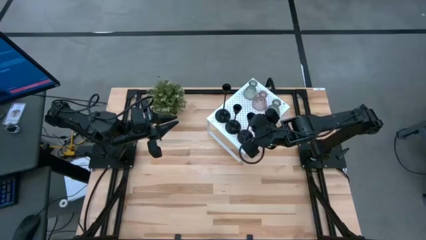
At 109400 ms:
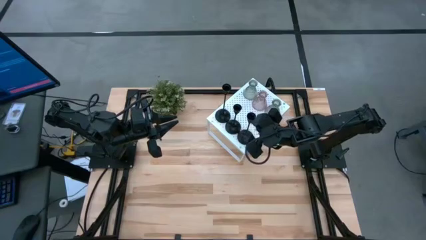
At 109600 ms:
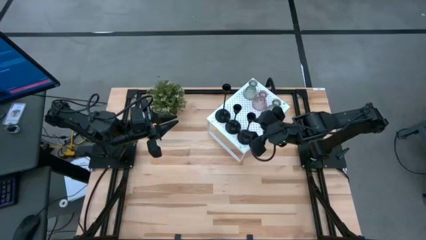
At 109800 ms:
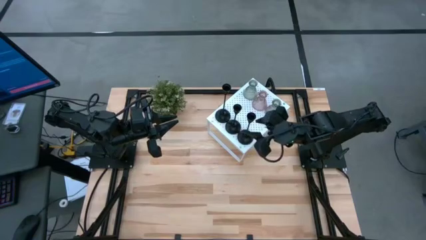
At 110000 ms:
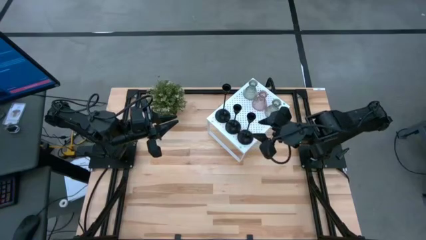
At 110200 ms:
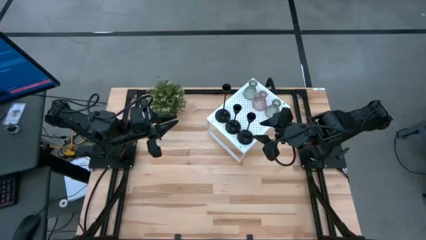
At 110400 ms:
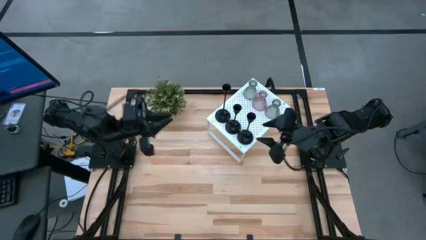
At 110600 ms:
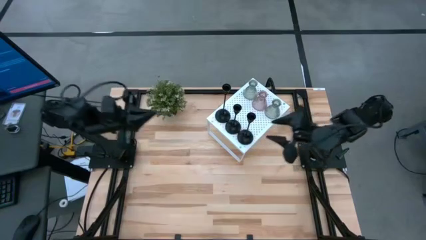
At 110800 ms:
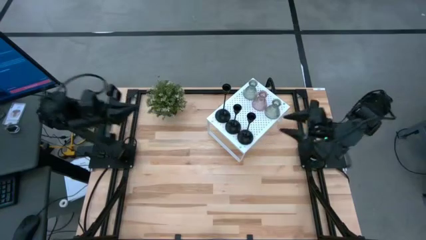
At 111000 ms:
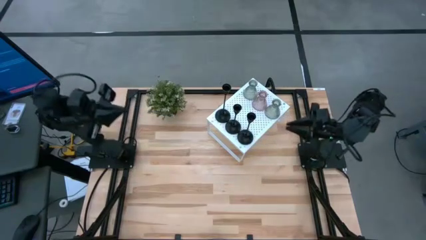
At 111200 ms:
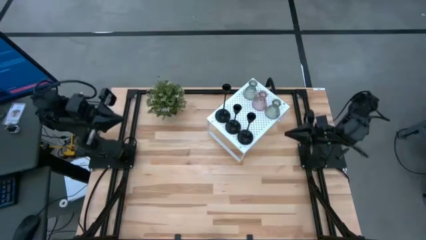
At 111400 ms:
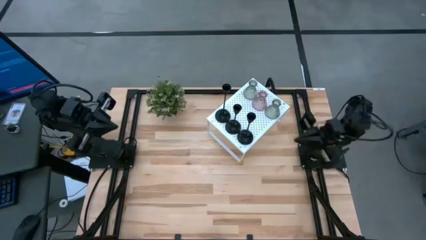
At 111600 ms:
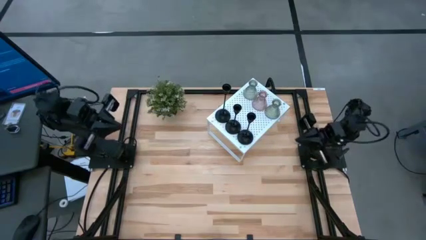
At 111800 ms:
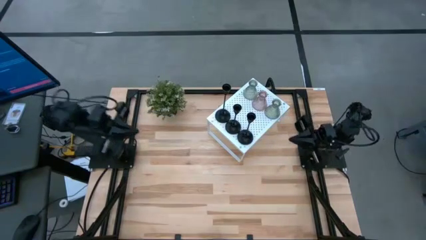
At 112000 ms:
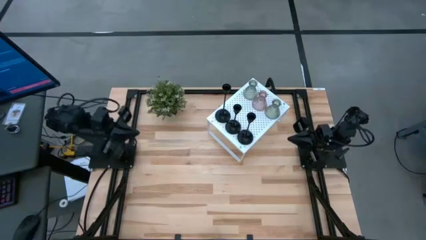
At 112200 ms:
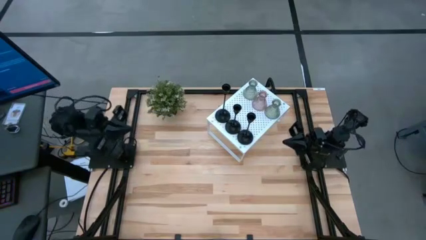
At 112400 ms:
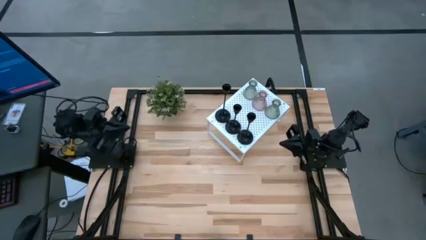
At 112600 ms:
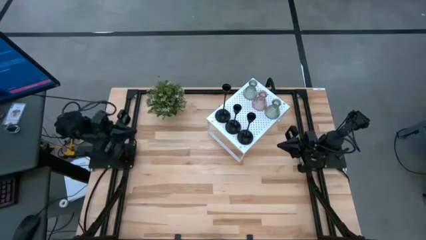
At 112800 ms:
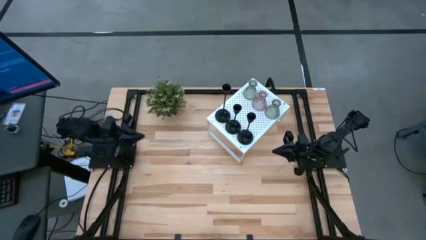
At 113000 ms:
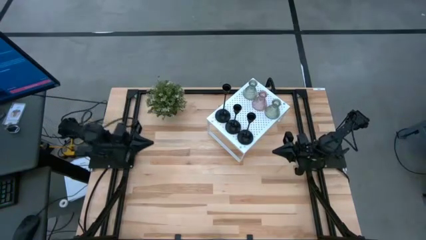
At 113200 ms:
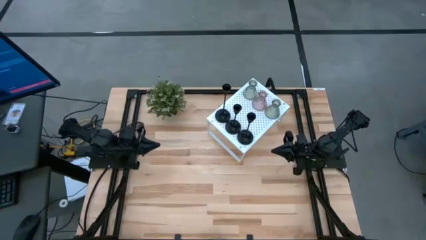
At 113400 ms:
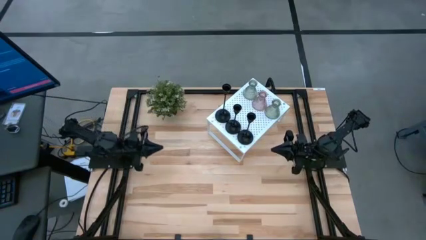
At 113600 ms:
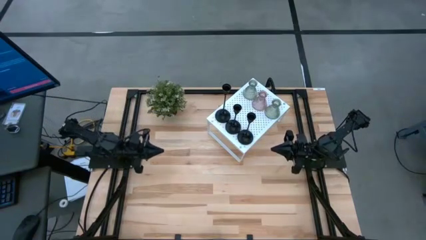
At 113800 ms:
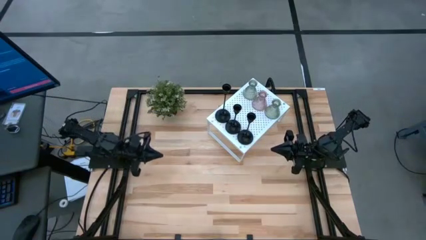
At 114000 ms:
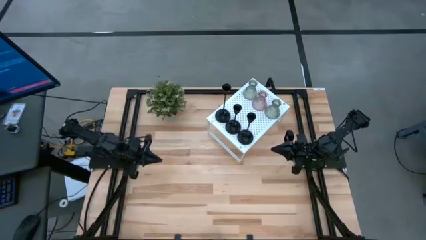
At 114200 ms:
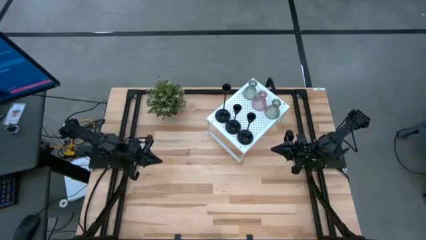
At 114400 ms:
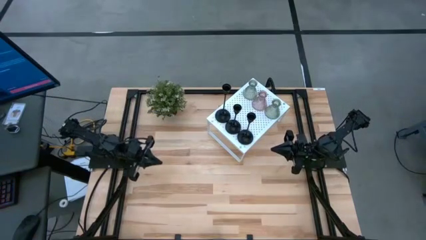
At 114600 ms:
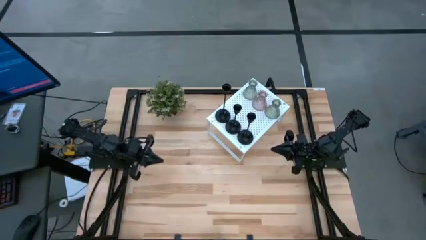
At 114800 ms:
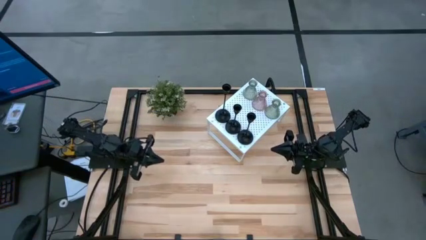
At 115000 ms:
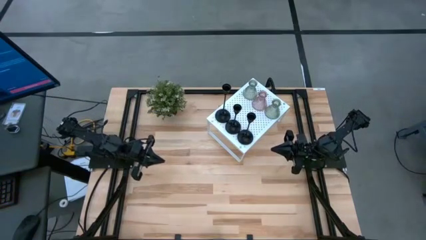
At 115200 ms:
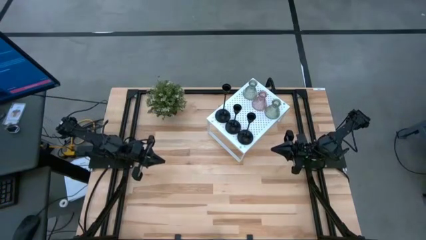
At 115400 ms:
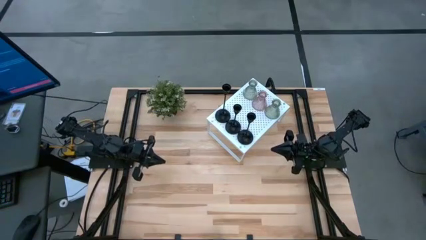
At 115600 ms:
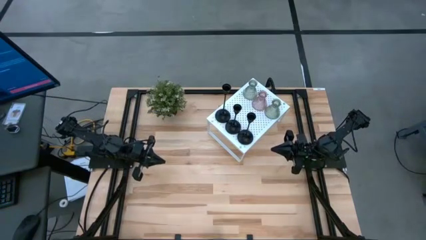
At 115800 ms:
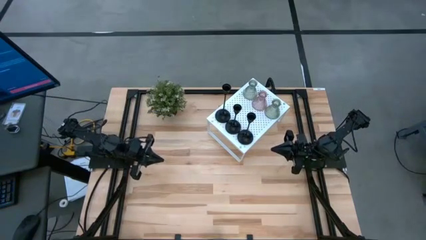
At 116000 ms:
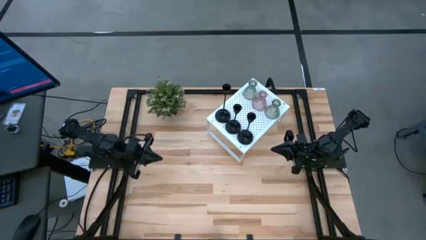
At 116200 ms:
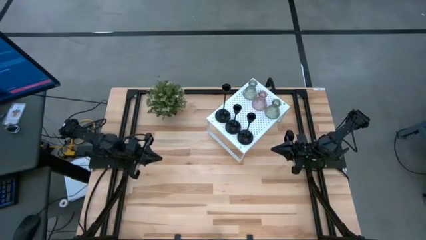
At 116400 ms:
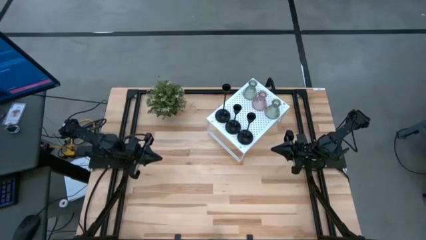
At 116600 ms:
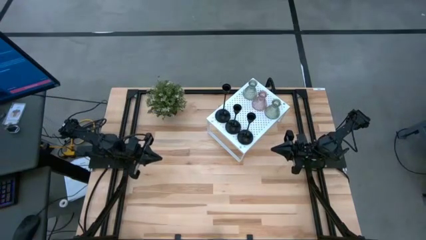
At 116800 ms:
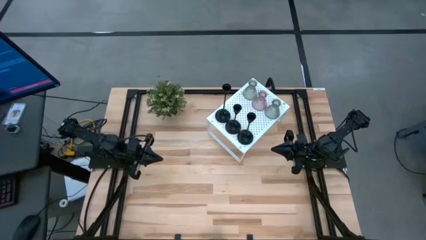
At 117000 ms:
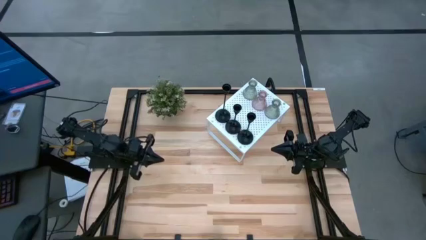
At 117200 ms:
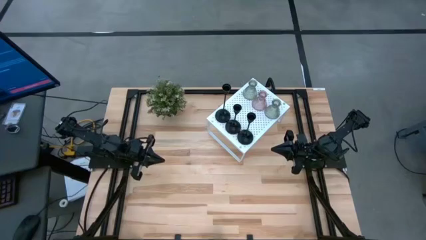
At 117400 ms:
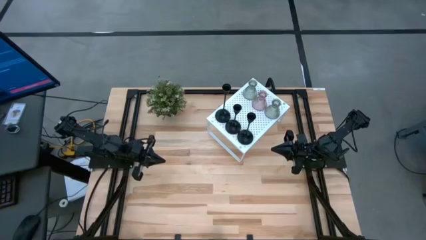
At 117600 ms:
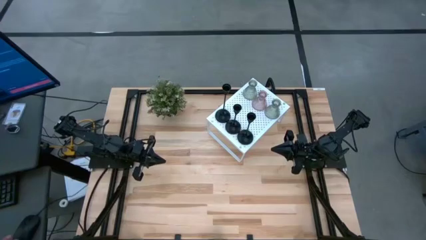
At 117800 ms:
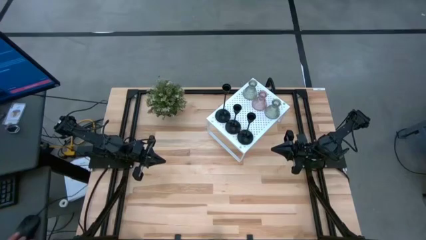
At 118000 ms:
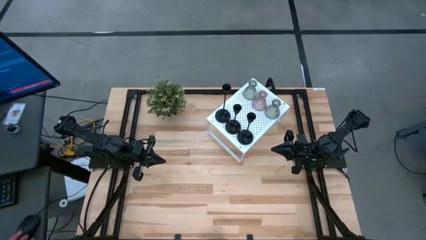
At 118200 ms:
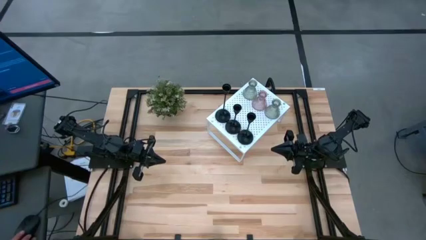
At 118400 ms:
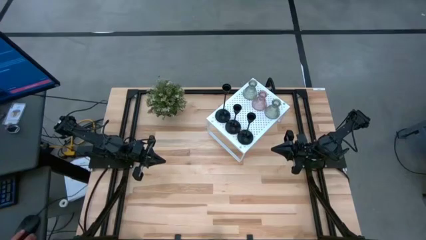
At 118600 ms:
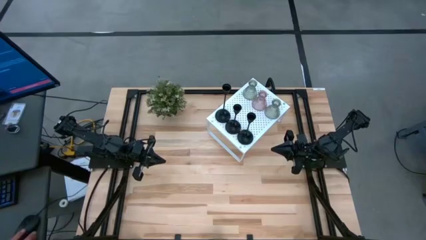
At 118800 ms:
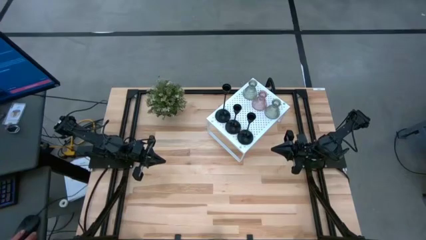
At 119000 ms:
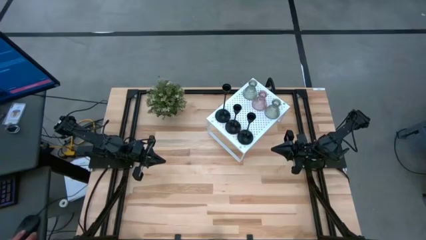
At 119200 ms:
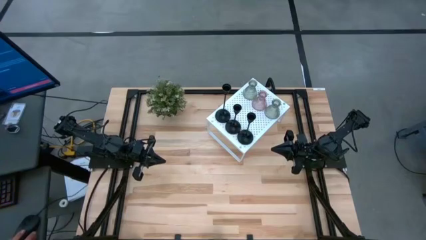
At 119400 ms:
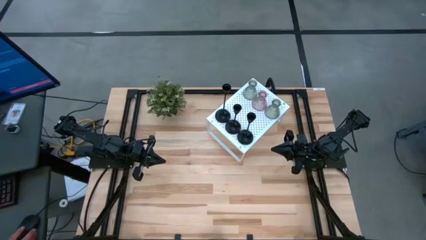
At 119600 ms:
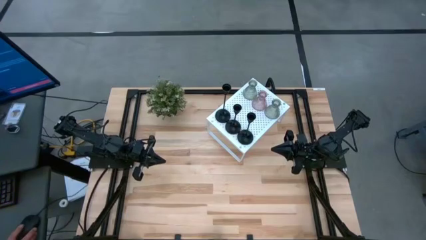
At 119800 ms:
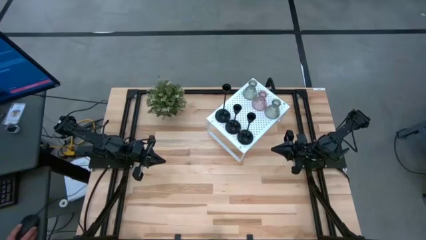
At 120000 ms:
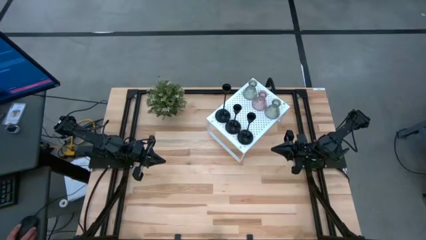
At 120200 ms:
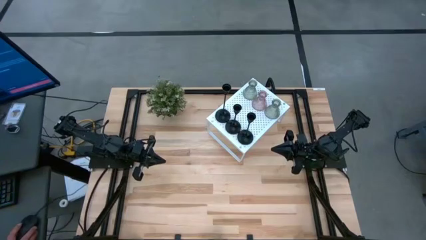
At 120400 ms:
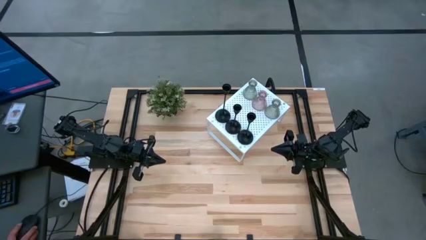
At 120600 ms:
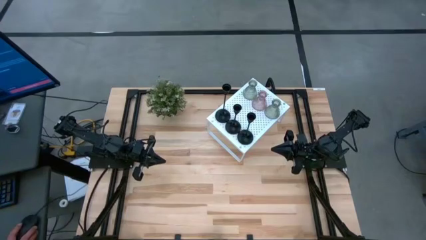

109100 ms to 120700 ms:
Task: Pick & Place candle stick holders
Return to Home Position

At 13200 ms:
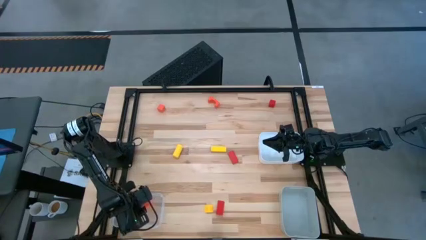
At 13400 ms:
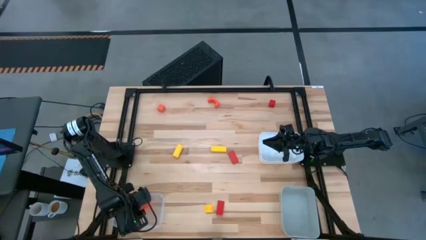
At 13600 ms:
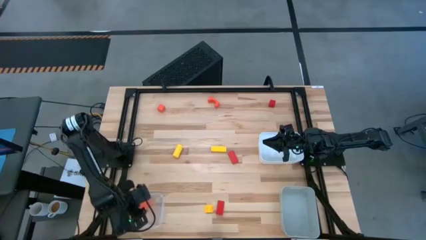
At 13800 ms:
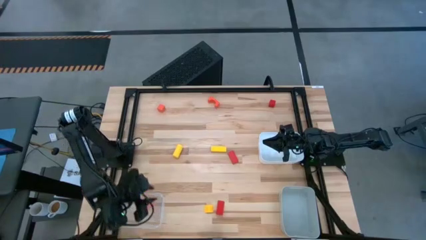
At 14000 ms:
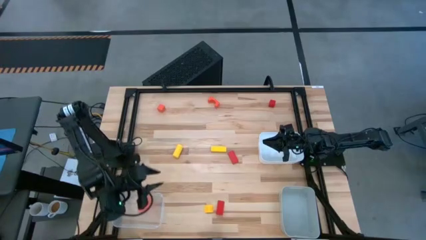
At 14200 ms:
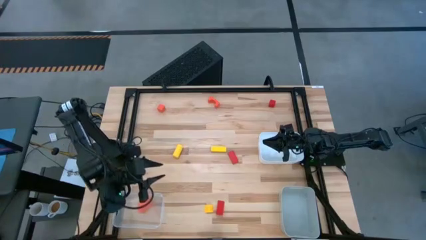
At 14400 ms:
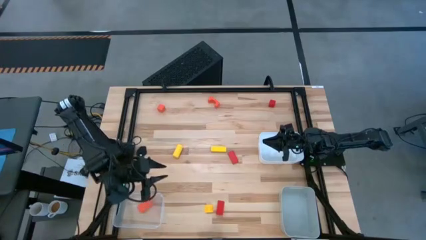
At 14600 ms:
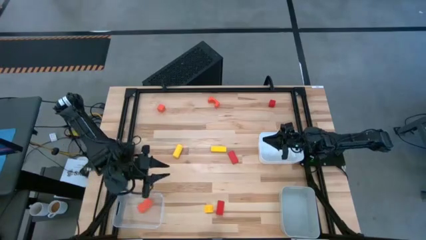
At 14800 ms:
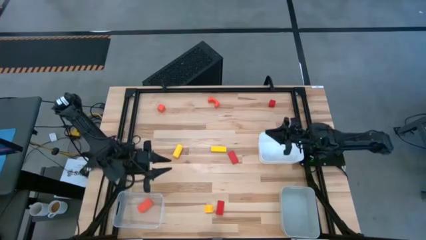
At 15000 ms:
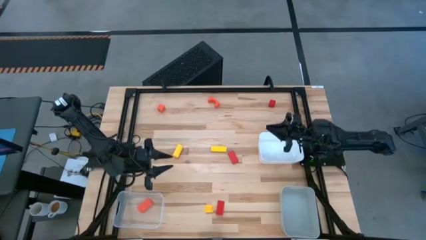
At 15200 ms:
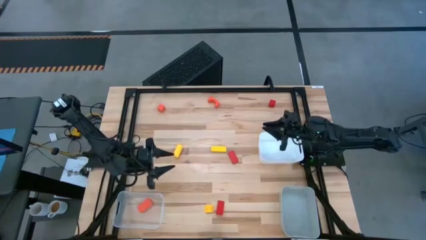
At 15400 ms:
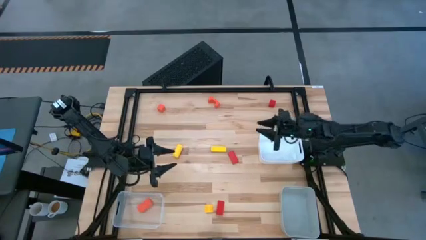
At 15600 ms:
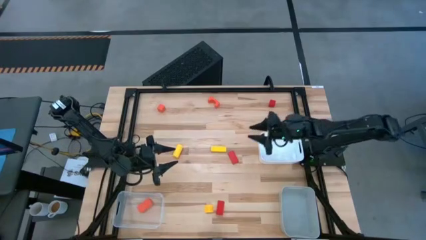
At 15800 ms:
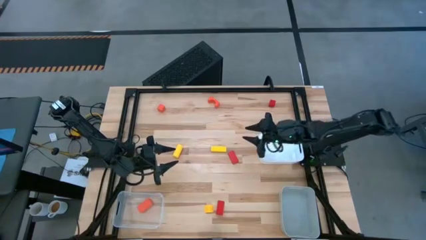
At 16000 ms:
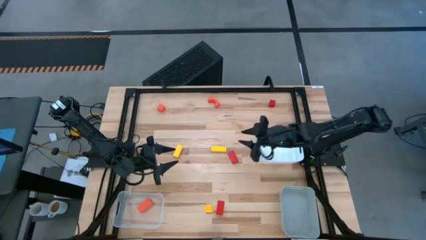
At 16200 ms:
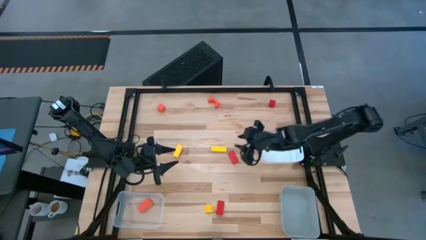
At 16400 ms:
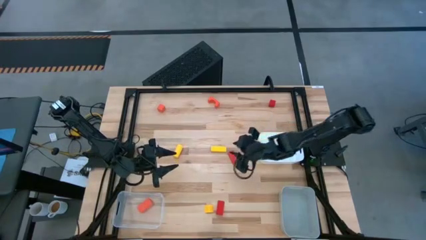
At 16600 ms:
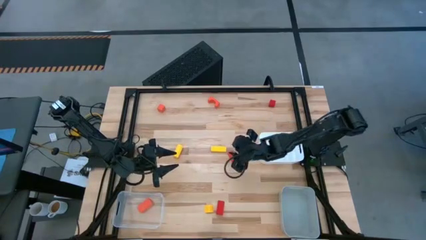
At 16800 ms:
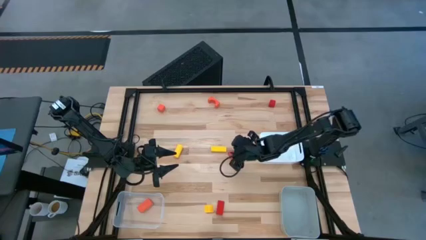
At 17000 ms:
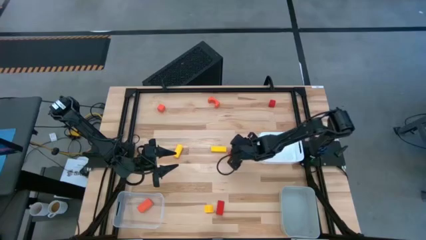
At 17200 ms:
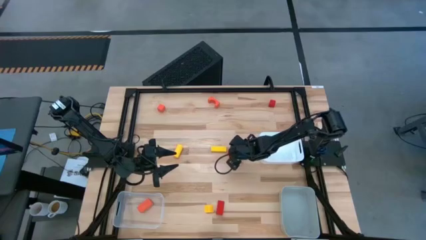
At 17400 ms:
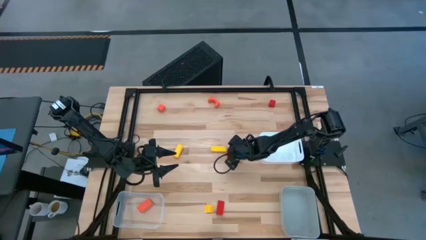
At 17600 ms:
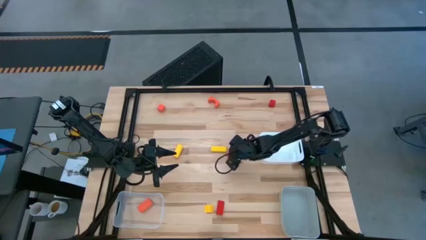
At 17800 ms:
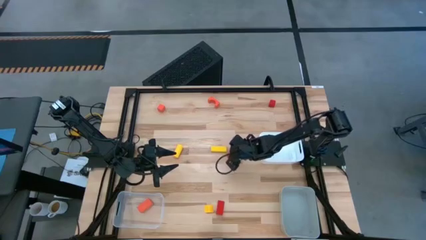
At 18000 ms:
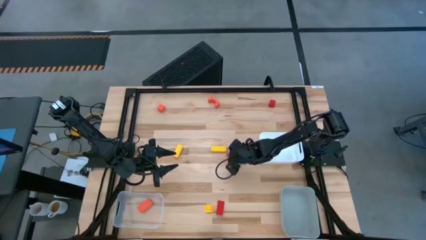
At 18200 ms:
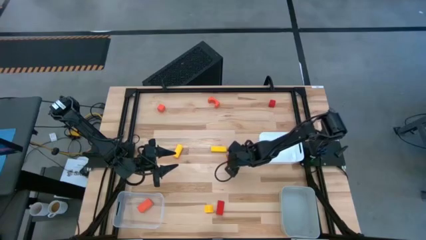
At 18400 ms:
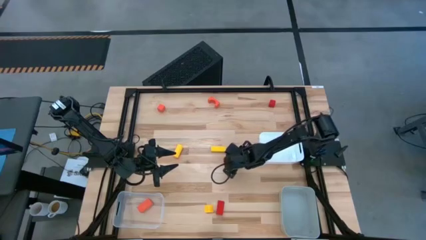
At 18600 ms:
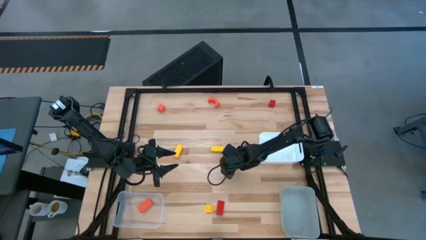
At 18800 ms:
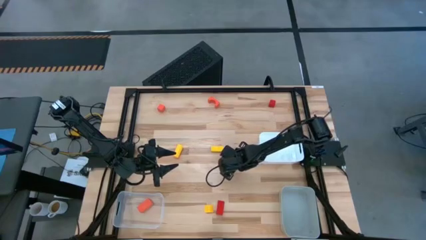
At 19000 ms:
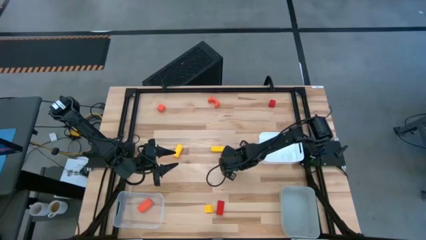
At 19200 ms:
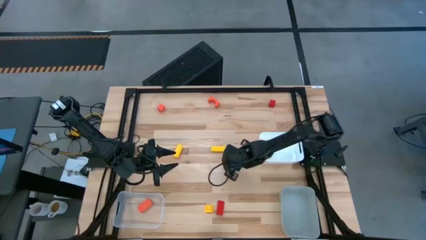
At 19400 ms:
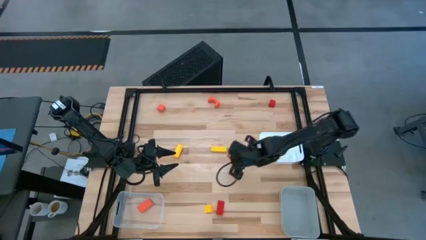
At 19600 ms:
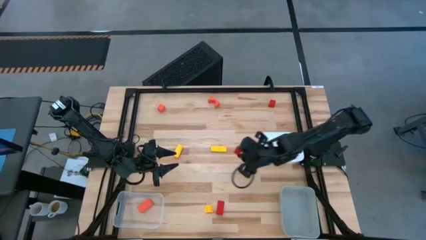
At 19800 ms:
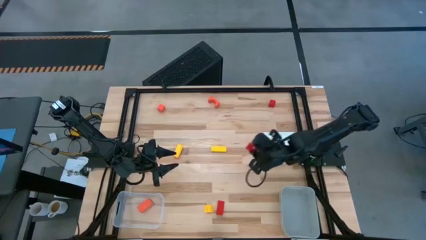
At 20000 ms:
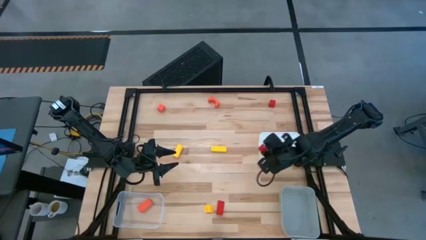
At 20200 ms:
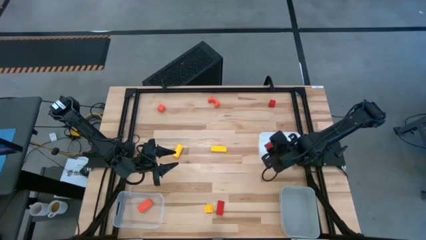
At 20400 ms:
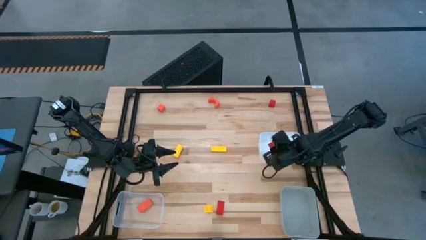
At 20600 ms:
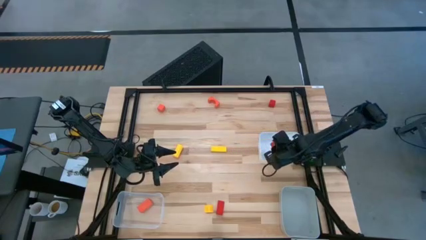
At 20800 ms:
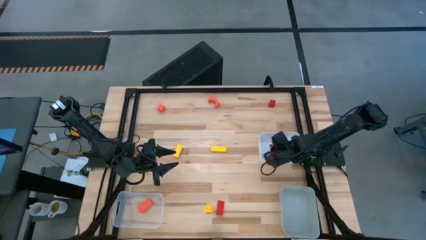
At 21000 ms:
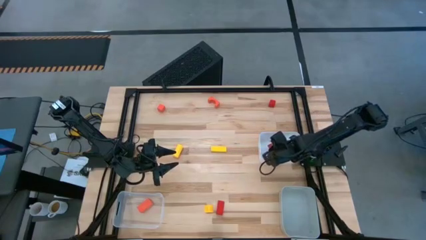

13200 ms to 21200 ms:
Task: Sort & place blocks by color
Put the middle red block into the white bin
